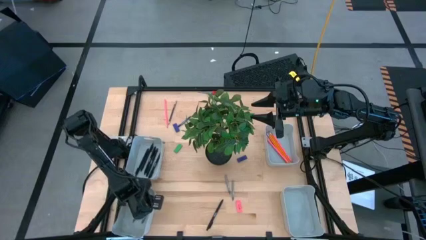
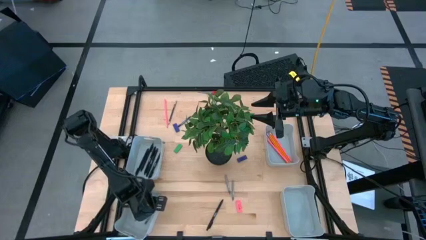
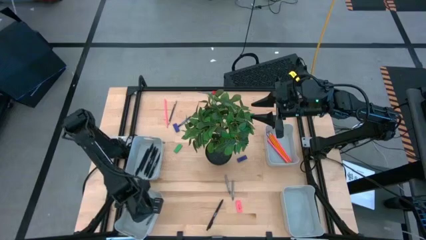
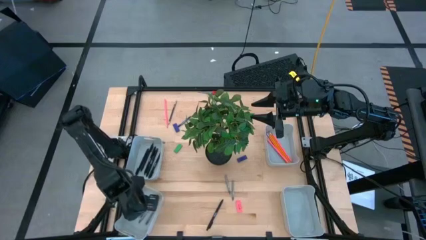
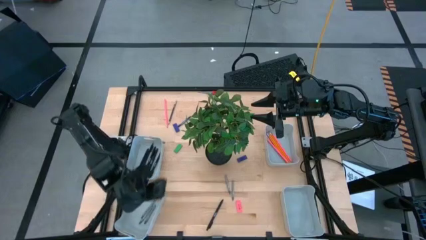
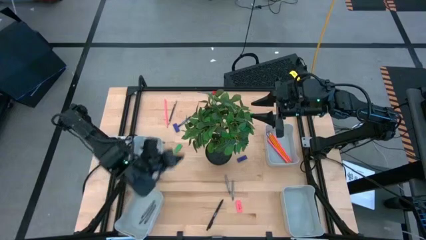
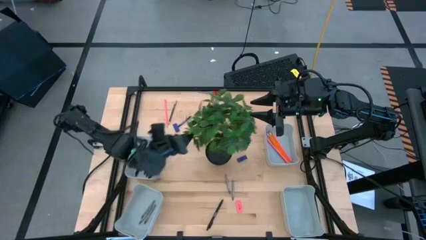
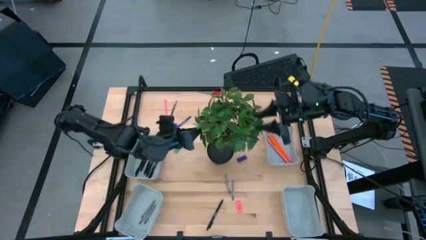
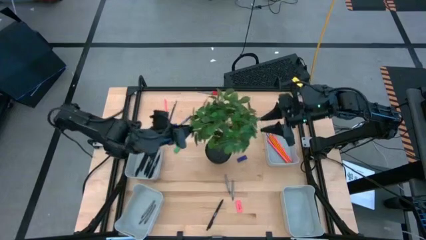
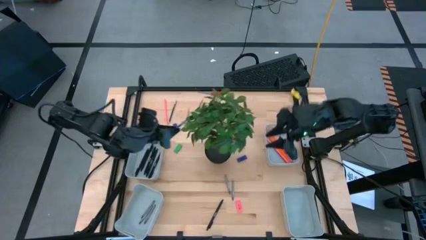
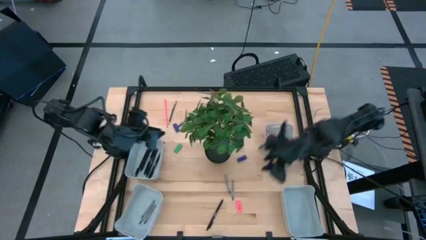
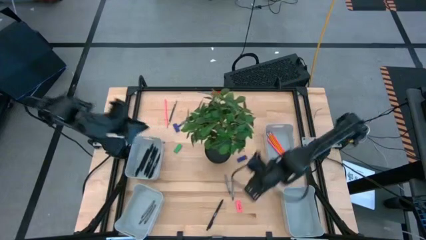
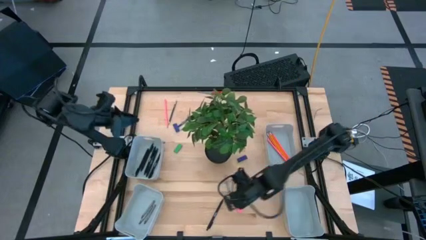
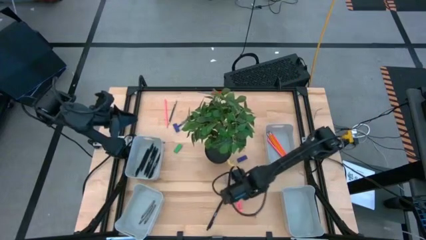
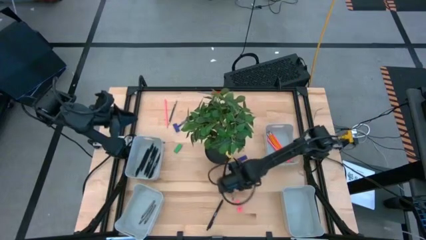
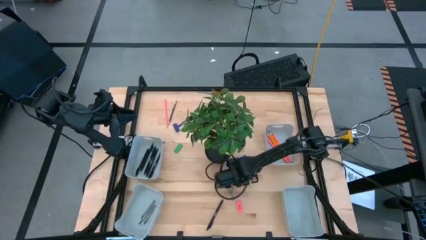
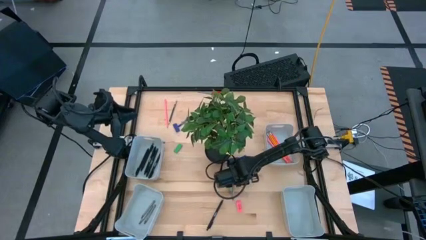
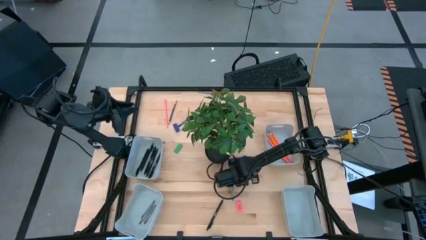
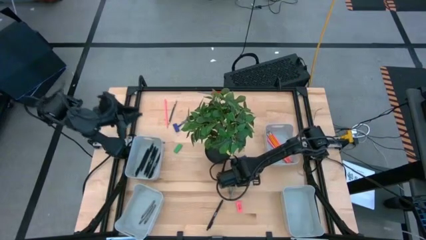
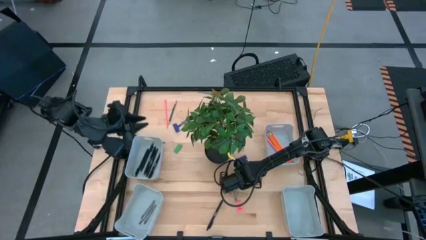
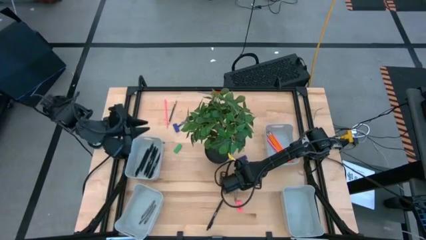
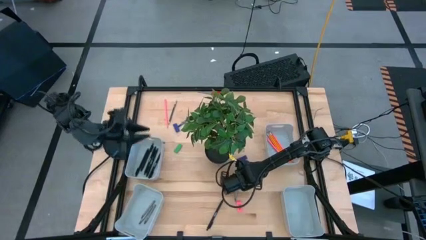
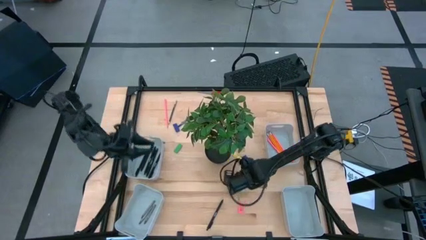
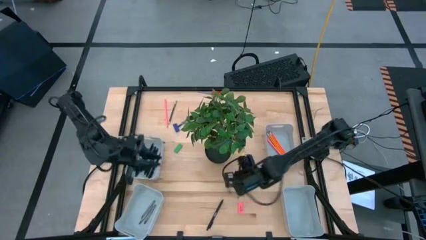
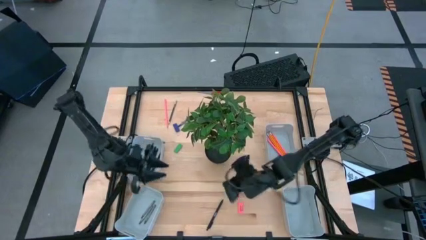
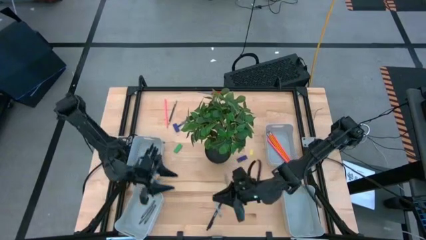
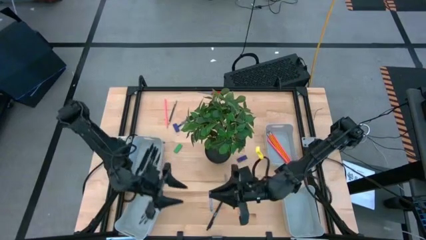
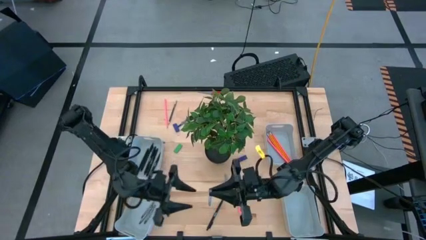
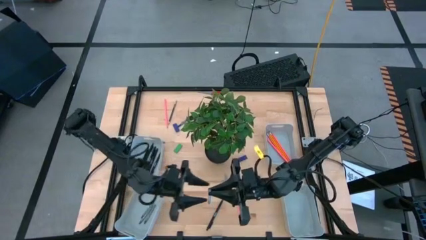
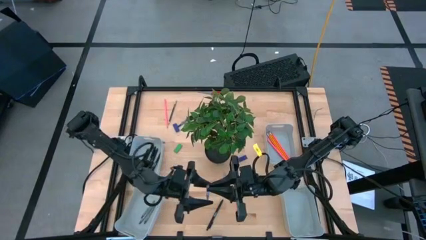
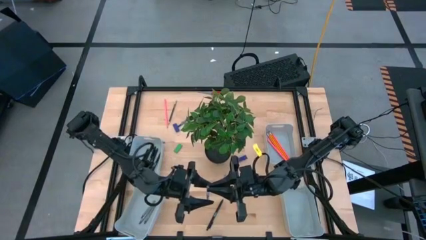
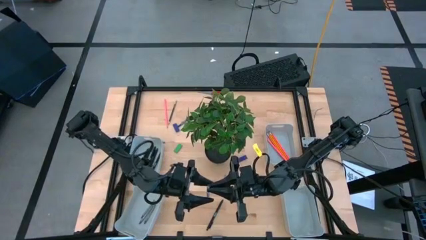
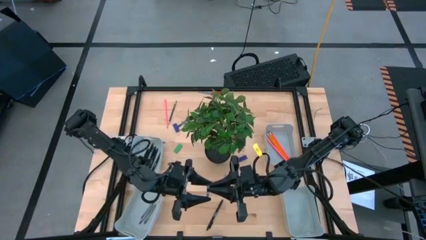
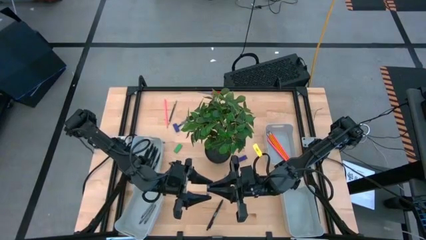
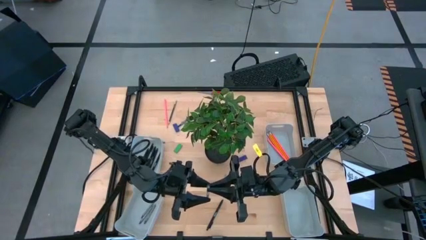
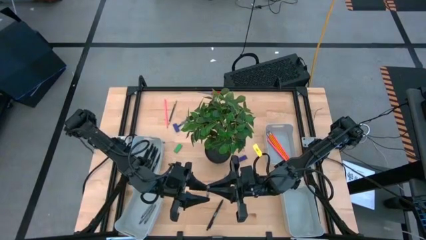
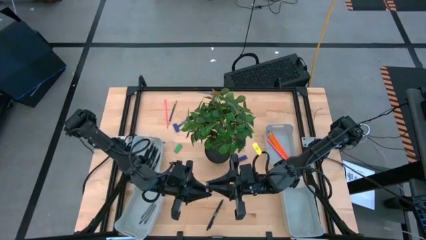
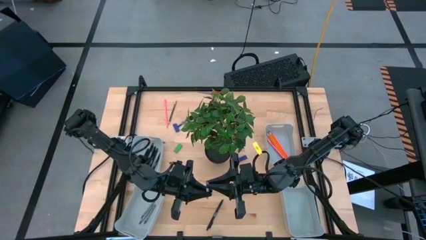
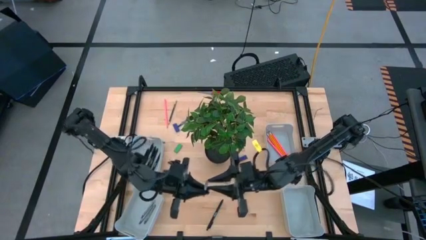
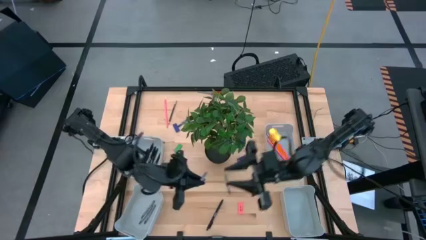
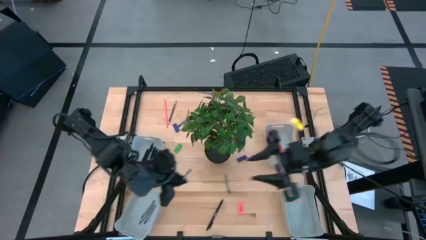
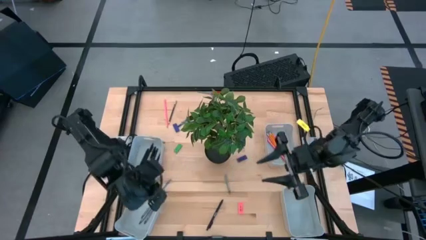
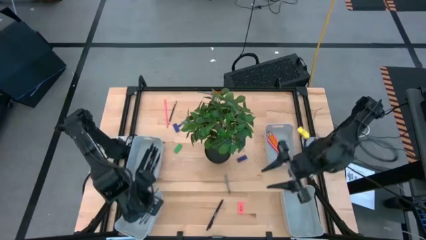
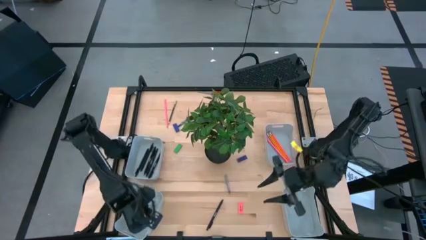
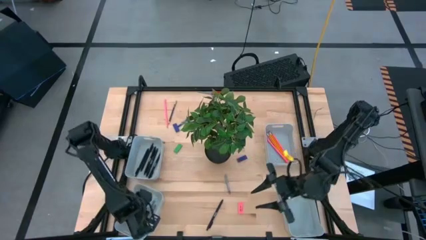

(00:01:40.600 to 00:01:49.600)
Task: Sort crayons/erasers/pens/pencils in bins
Put the gray crayon into the bottom left gray bin

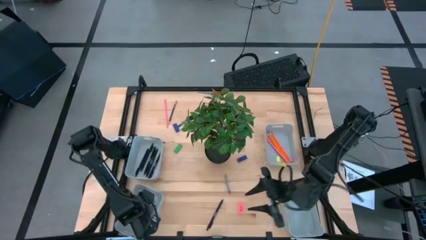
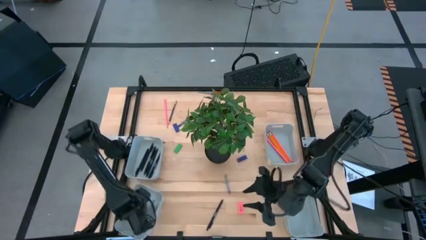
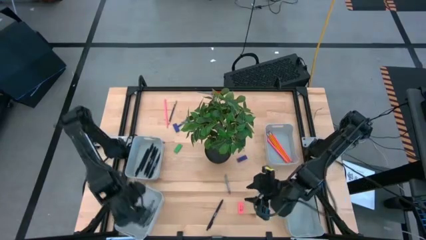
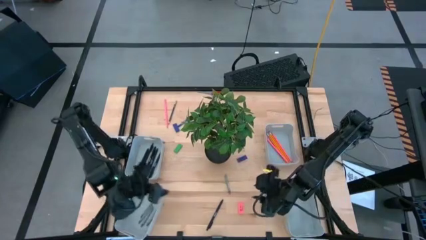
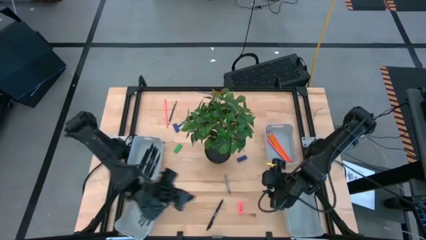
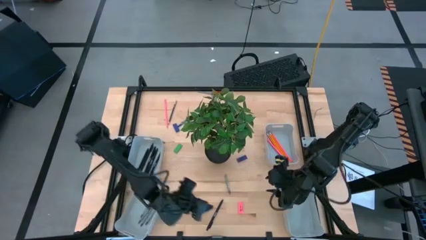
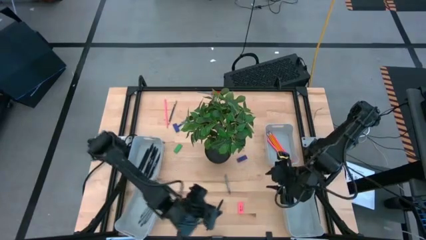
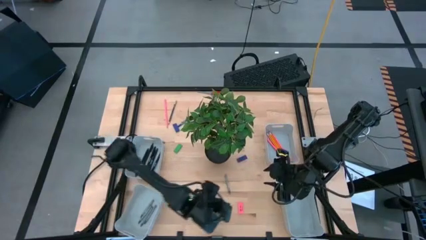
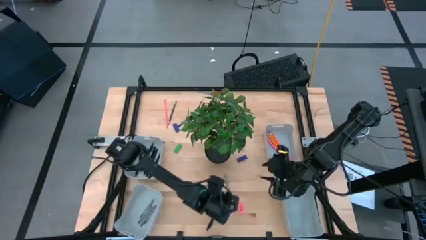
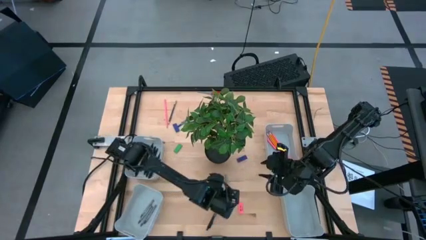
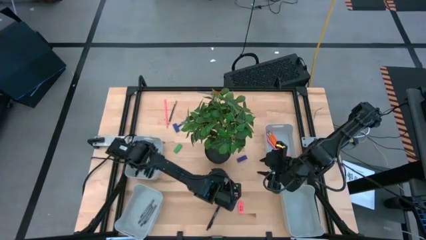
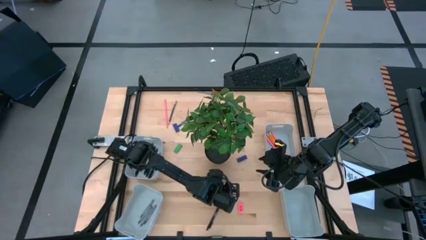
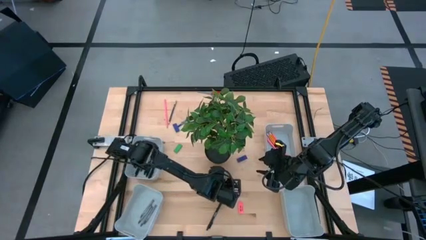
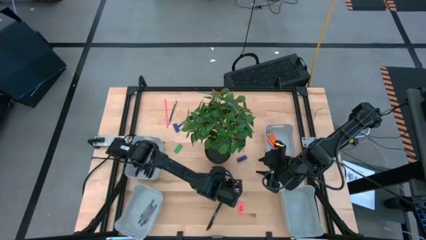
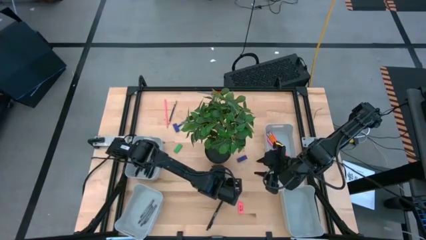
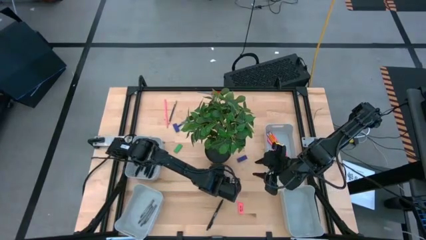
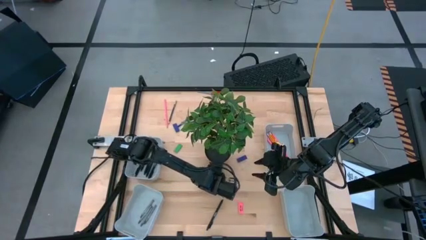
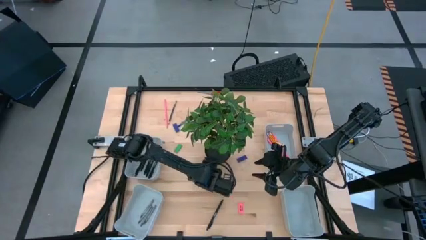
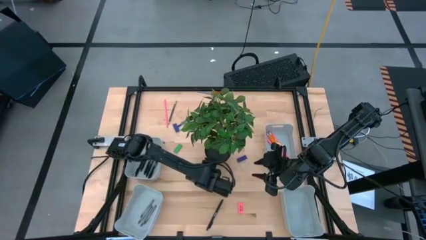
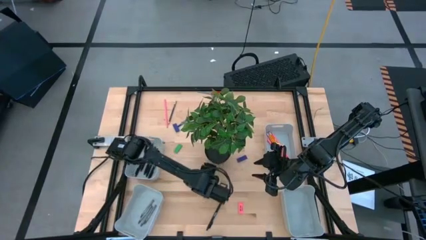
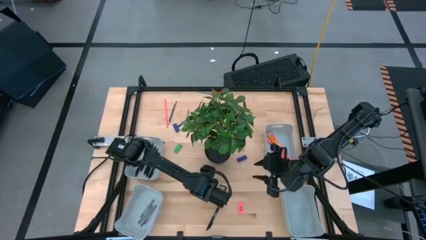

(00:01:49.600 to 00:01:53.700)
Put the gray crayon into the bottom left gray bin

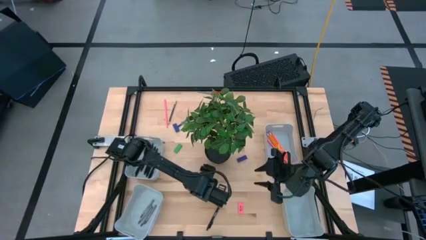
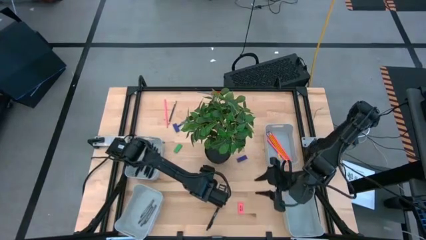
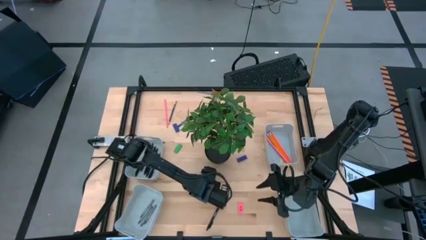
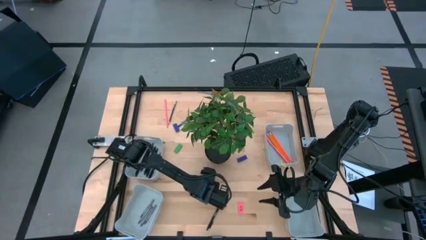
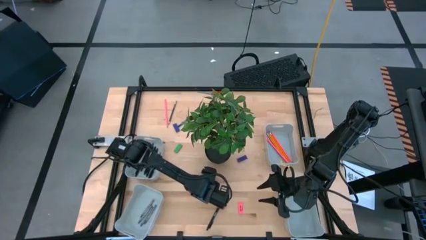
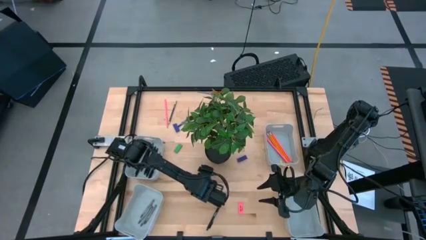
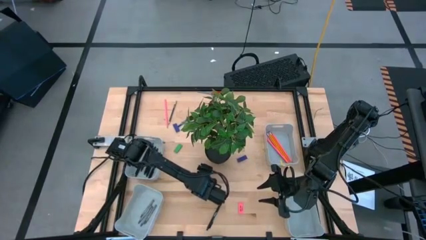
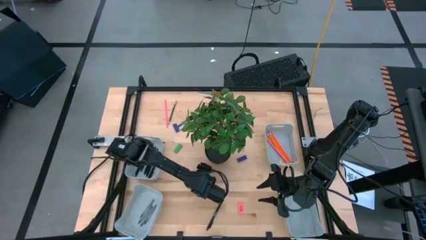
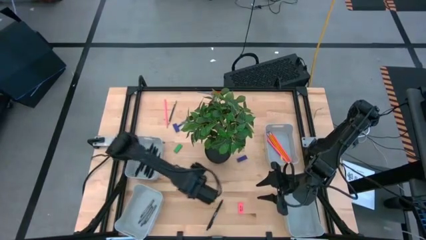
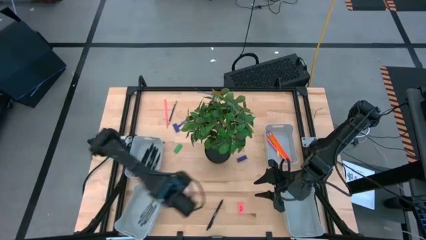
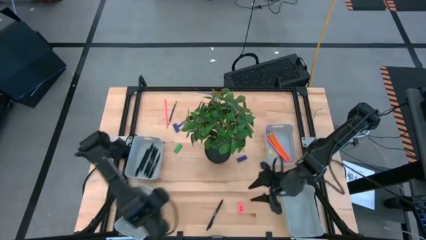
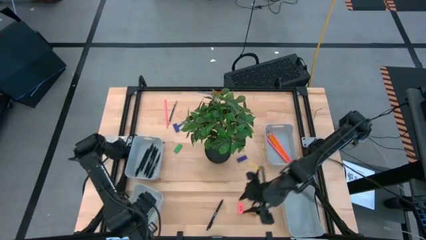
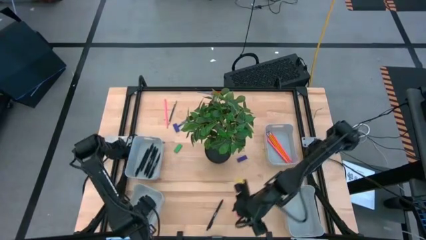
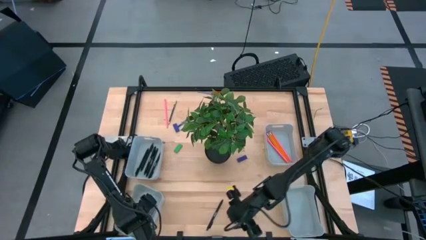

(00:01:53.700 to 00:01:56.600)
Put the gray crayon into the bottom left gray bin
